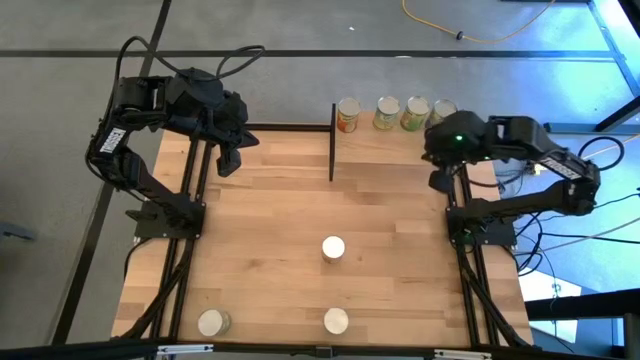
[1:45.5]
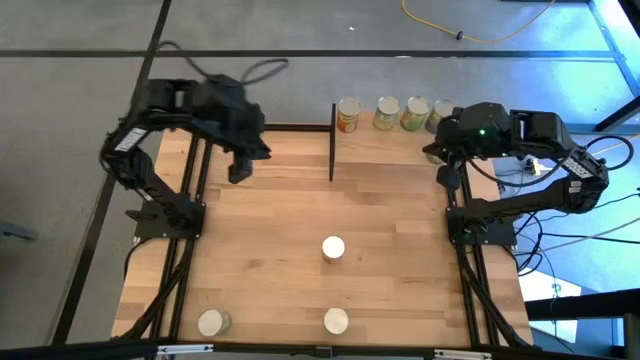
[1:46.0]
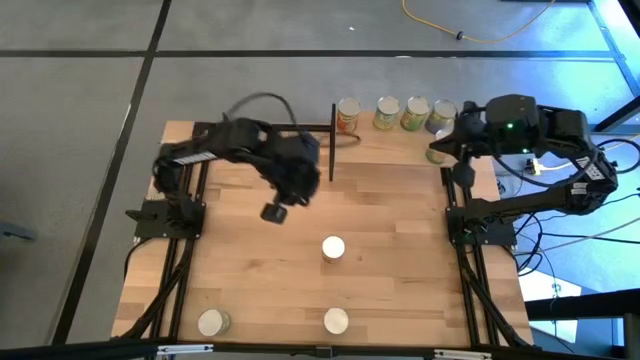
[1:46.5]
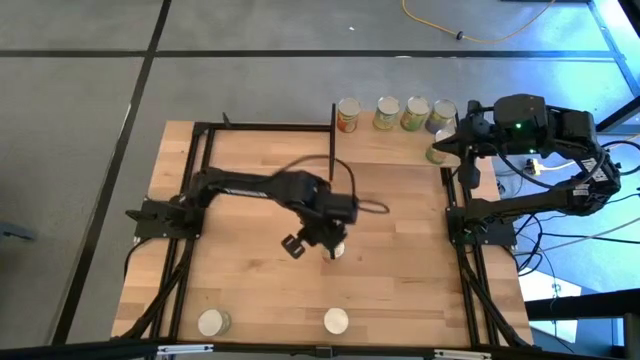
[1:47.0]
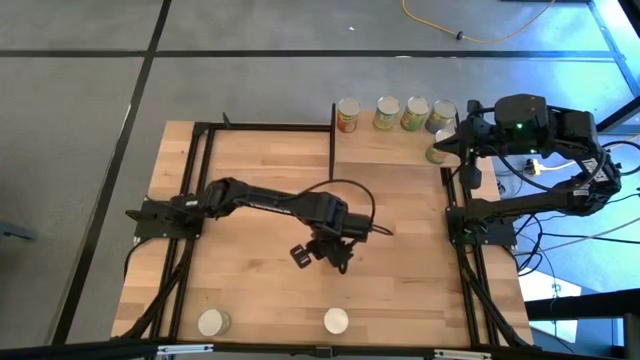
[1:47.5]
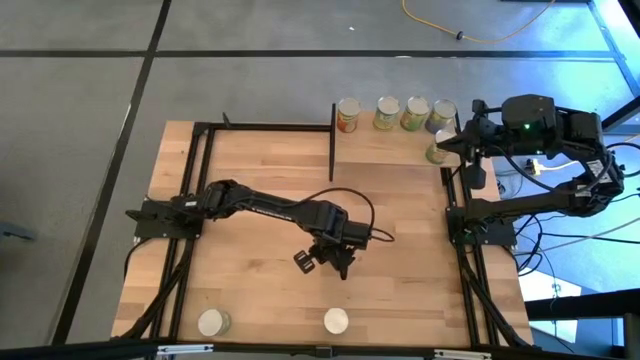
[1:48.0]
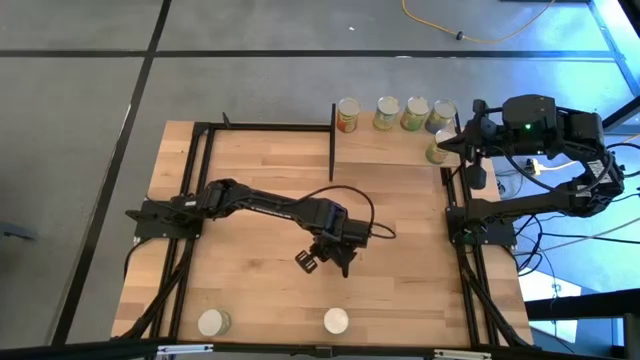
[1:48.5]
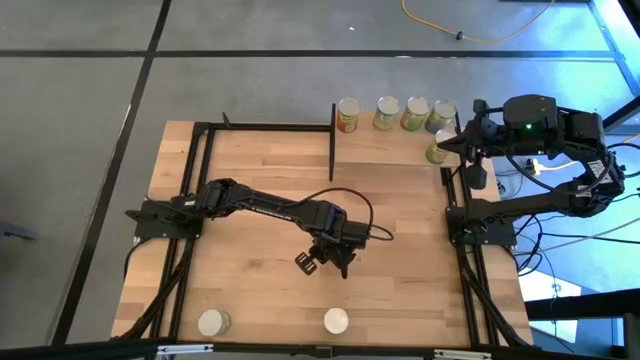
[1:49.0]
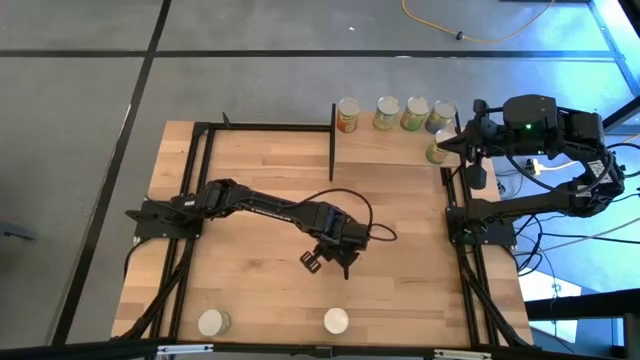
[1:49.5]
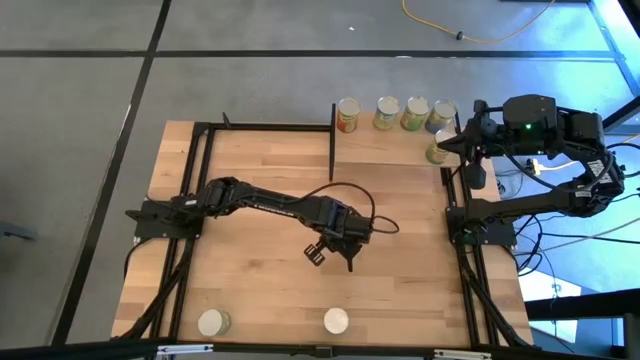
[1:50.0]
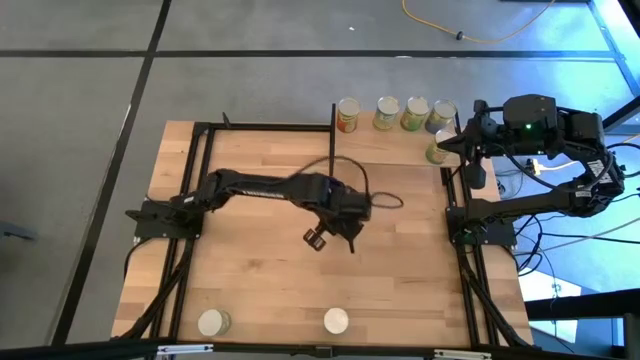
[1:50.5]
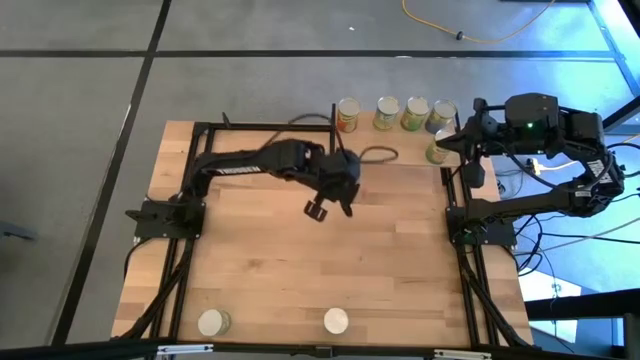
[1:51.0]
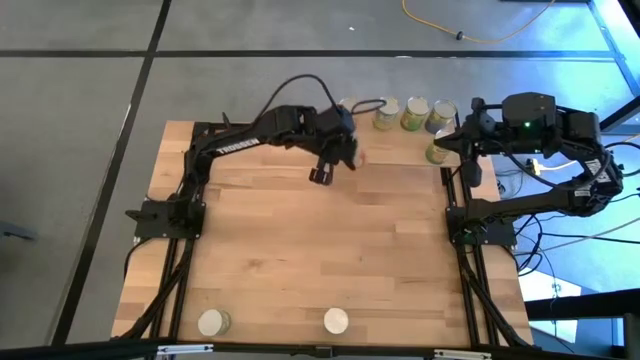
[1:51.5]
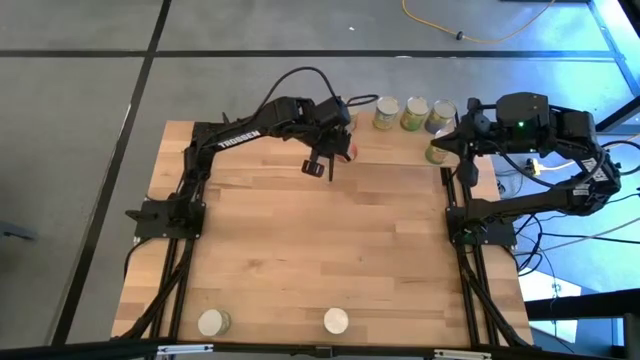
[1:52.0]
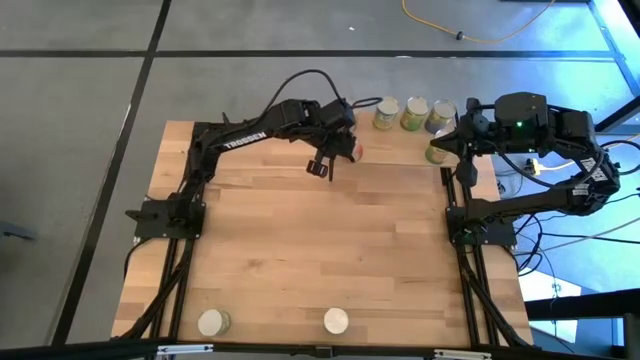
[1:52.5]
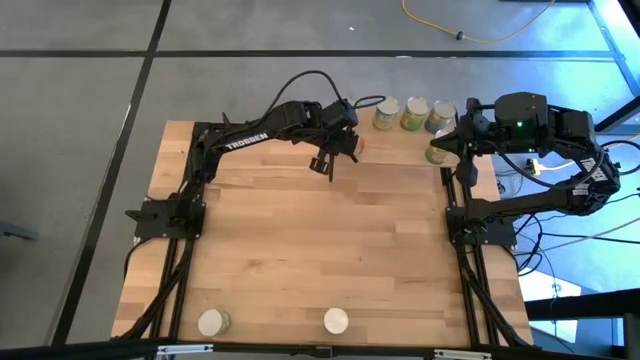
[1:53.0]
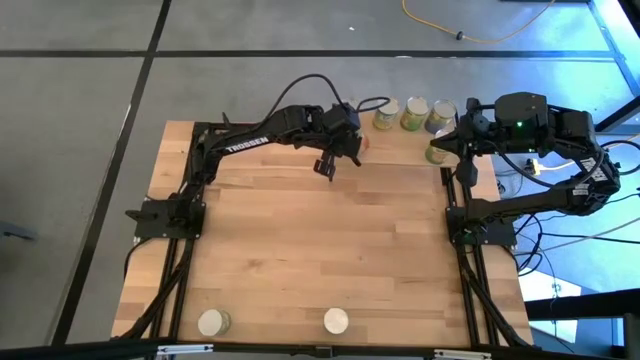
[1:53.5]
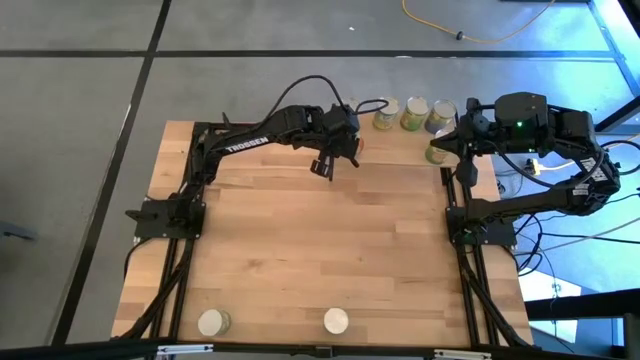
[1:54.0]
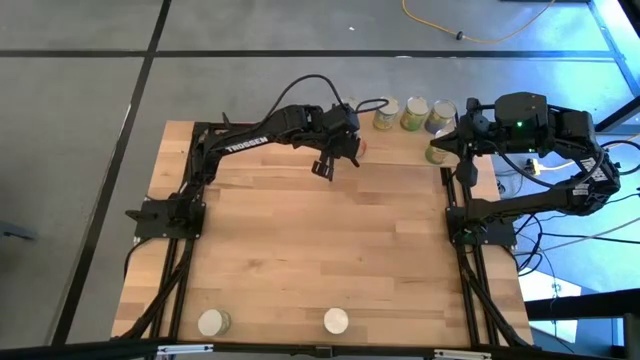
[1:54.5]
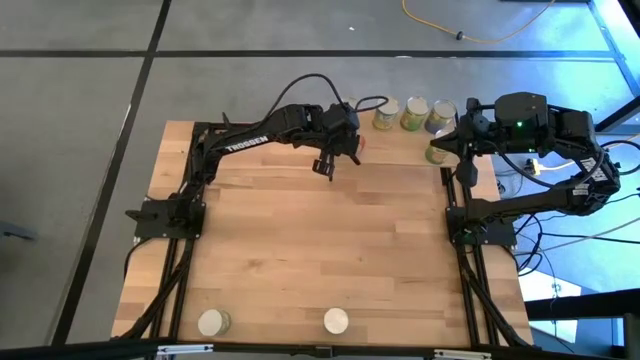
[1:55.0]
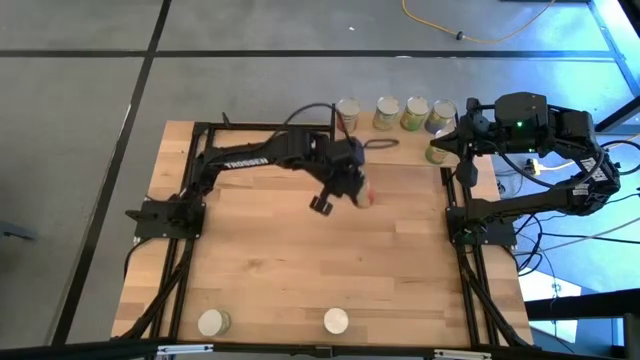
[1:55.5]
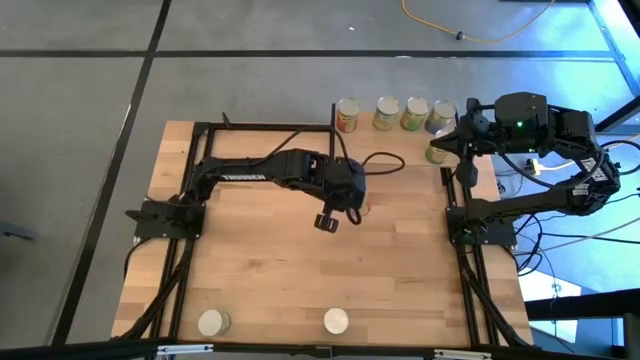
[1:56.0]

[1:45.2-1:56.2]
Task: Pick and place cans onto a shelf
Put the canned pineapple on the shelf

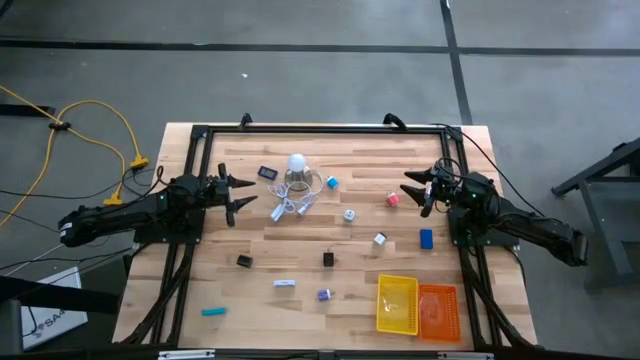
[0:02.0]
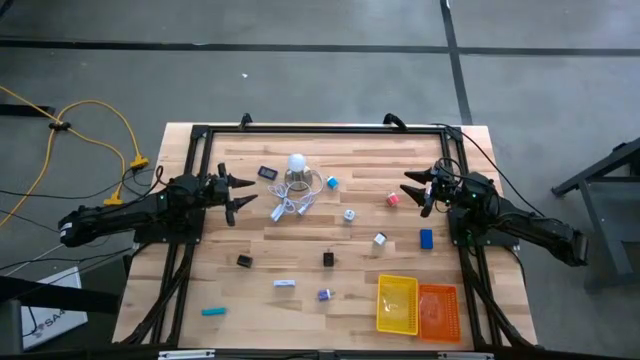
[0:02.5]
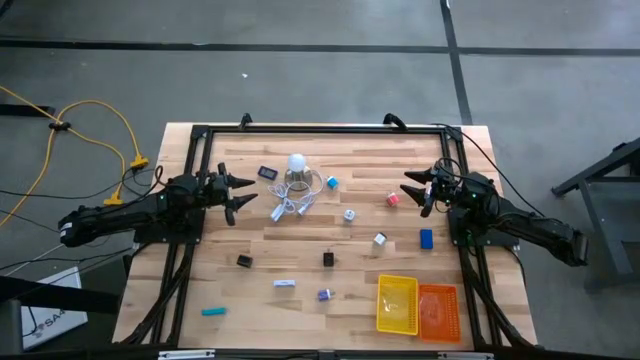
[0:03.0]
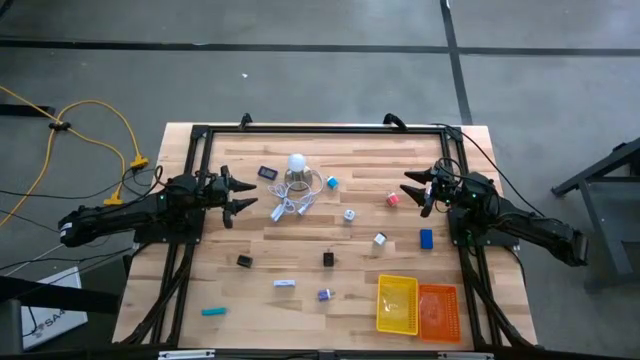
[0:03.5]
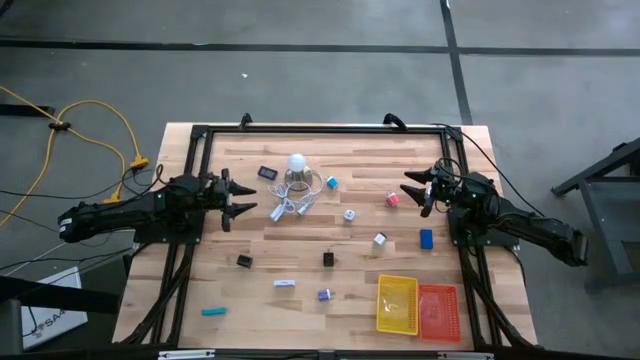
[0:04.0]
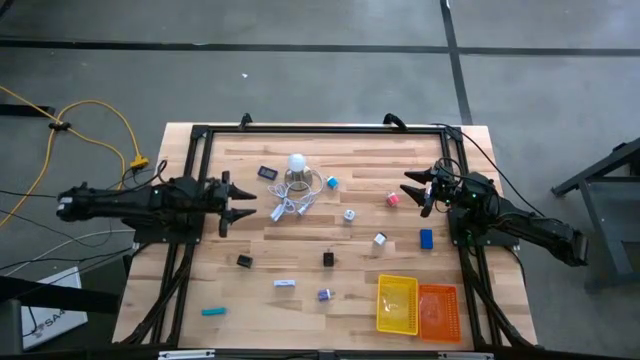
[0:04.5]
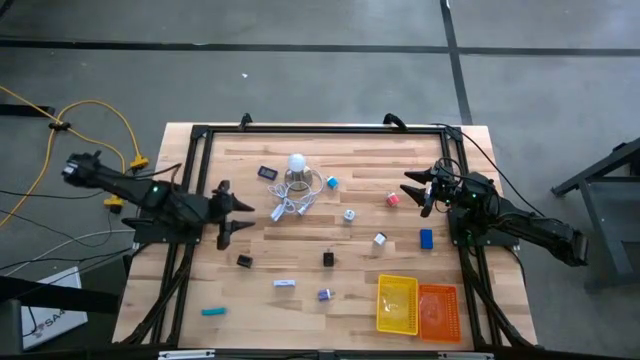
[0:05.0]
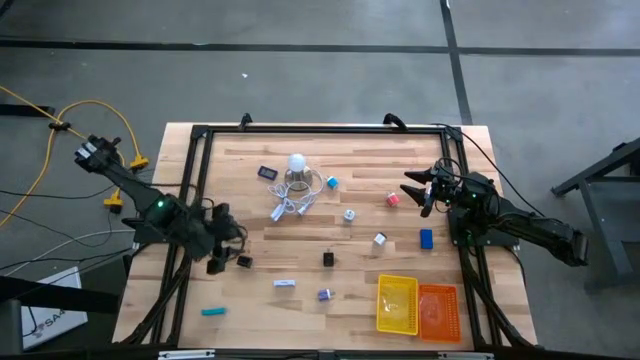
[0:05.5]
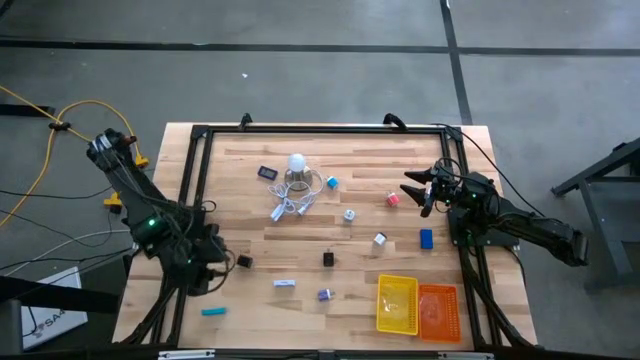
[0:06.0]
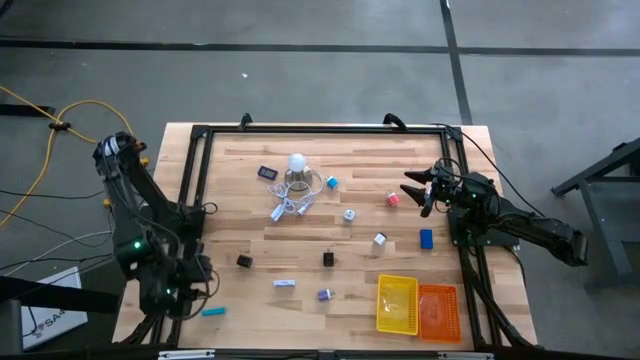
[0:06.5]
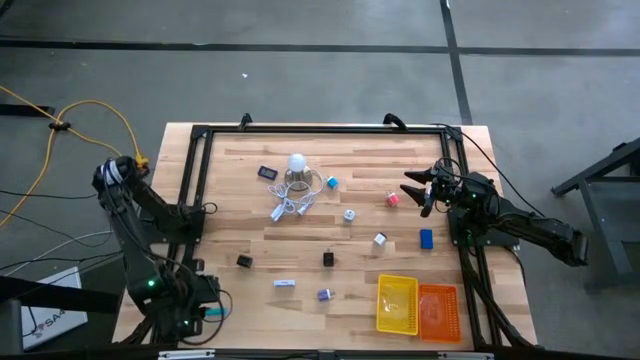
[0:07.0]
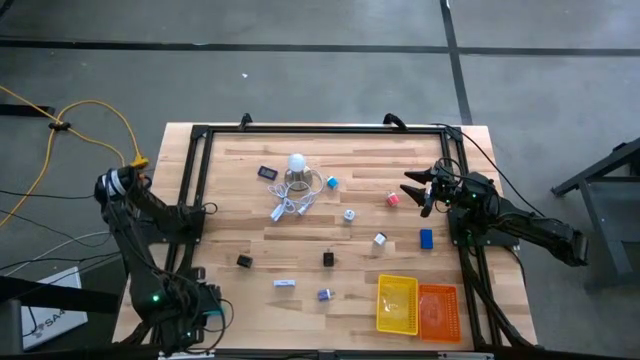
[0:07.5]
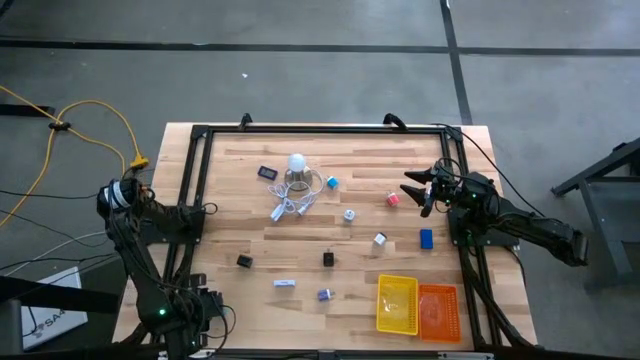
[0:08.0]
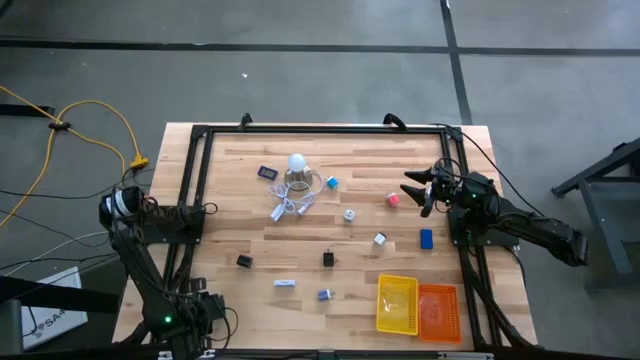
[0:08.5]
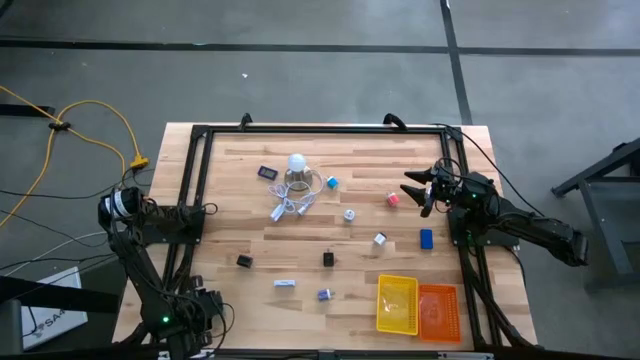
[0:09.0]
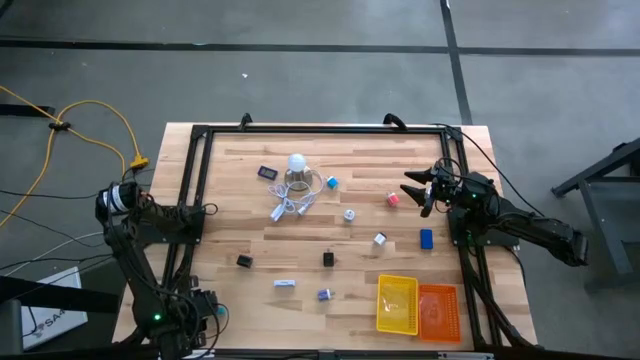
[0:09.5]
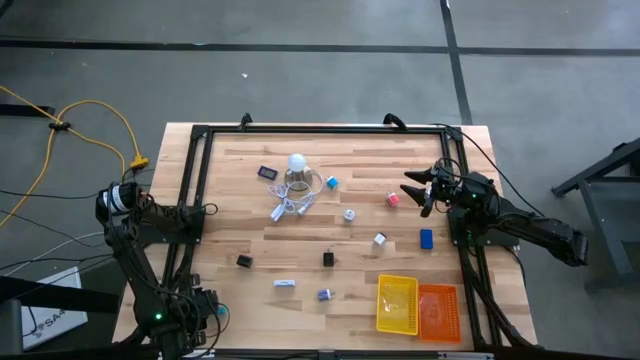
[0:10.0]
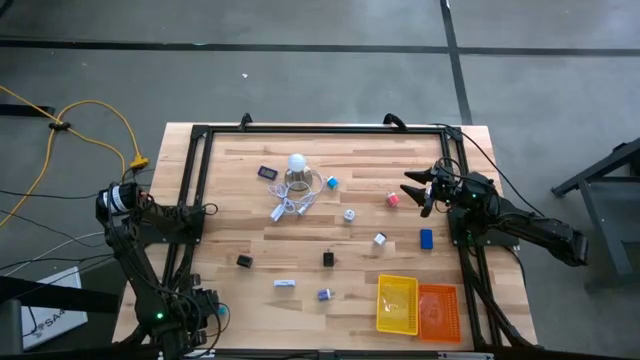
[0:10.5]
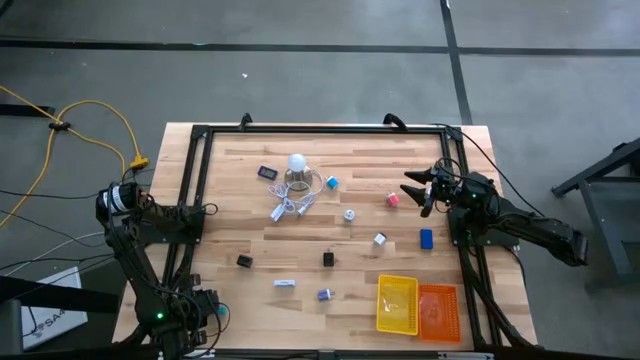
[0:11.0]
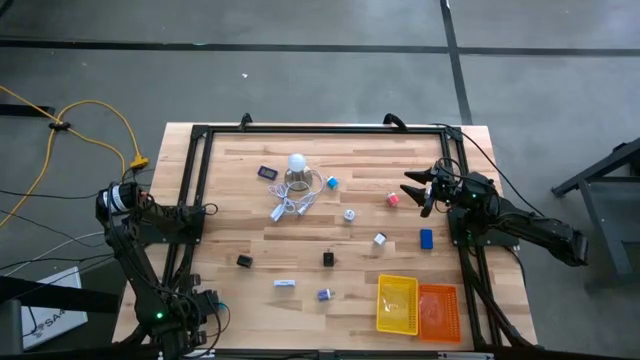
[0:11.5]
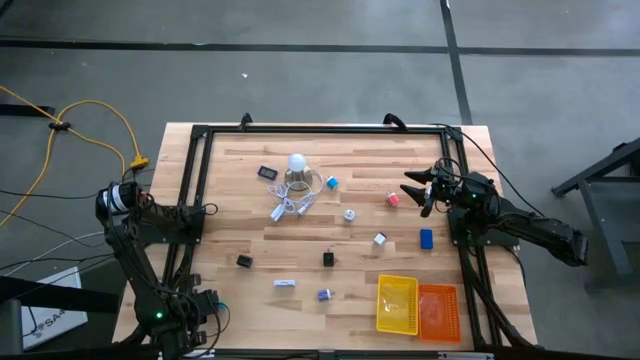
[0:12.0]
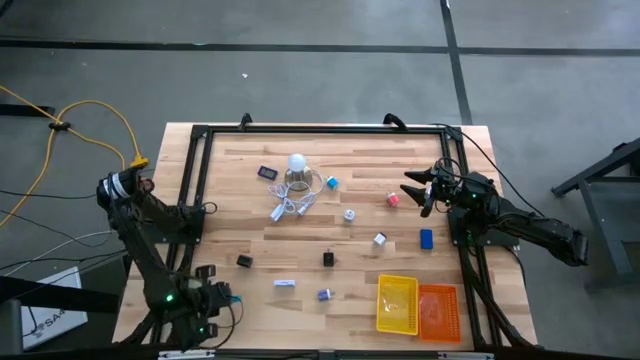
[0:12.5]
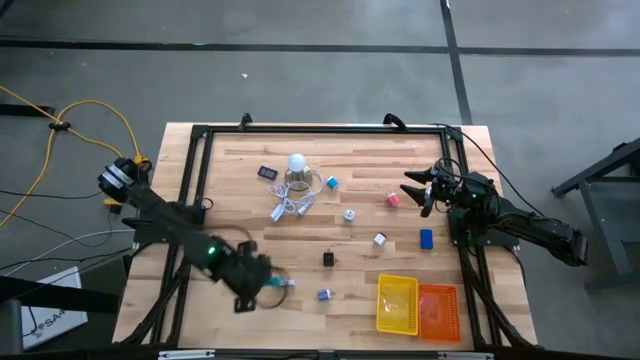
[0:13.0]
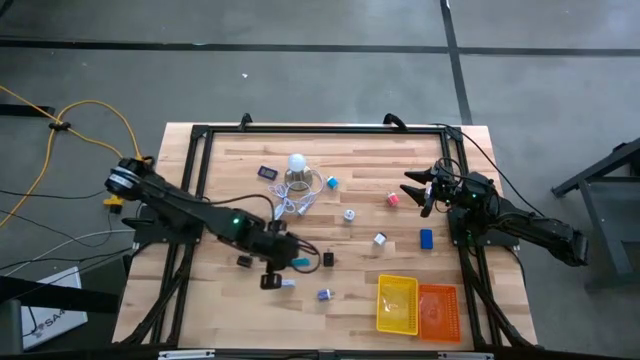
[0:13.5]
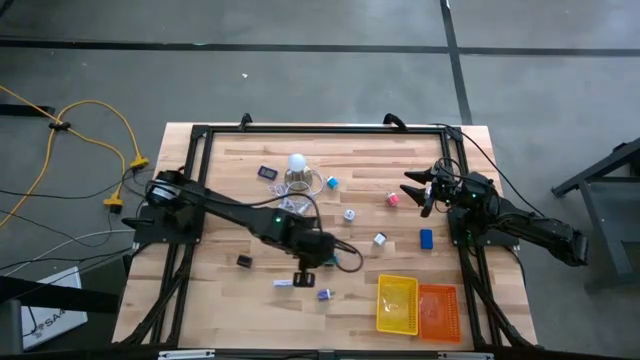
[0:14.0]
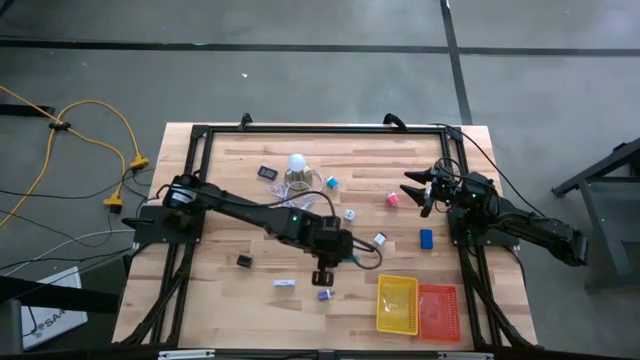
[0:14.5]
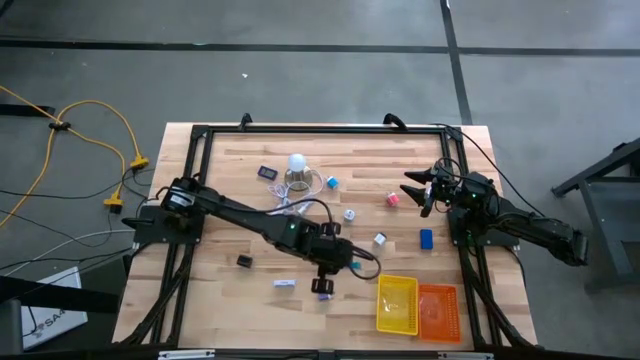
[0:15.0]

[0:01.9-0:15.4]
Task: Pick & Place Office items
Put the light blue digital clock into the yellow basket
